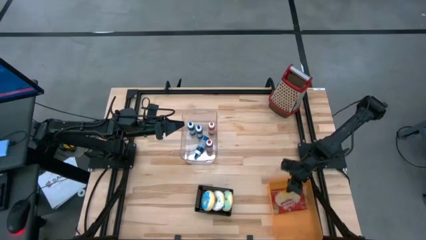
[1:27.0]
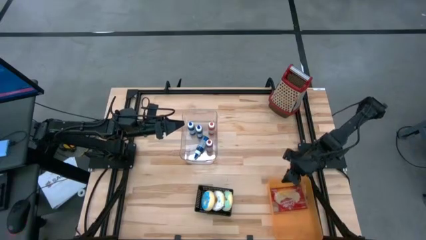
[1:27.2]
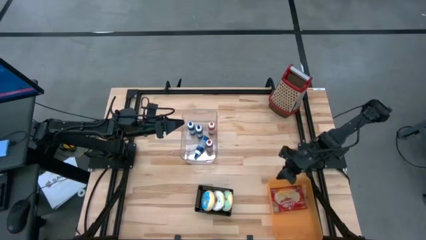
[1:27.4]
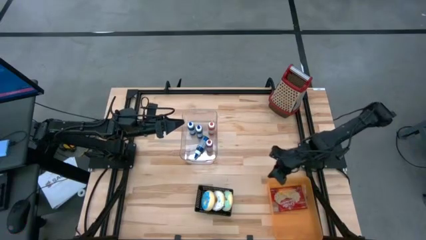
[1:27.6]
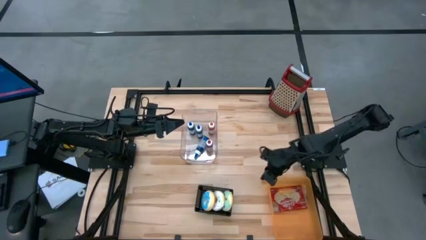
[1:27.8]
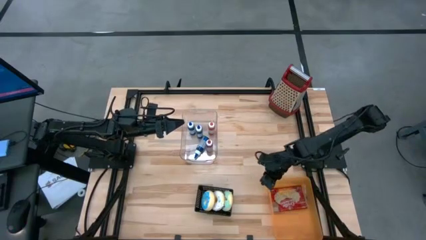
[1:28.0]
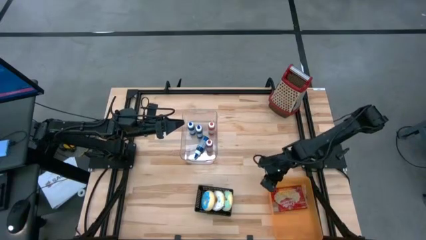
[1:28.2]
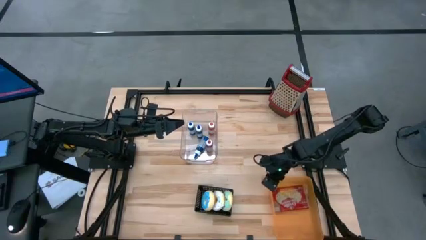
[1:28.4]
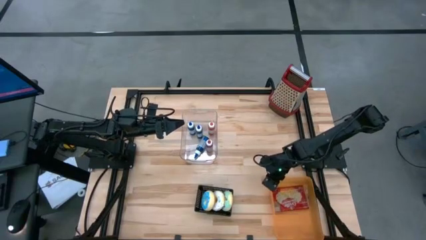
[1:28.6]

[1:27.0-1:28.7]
Adjust the orange bin on the table

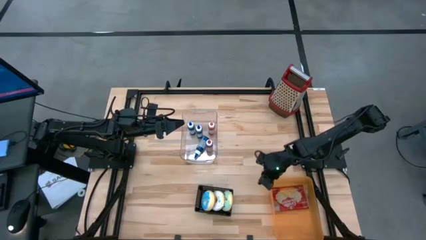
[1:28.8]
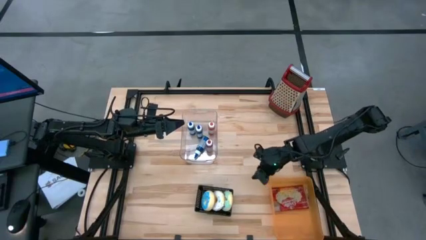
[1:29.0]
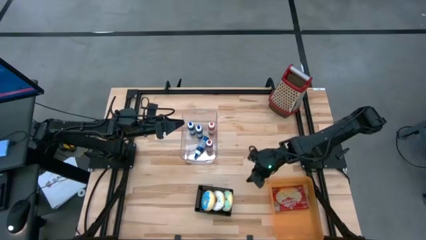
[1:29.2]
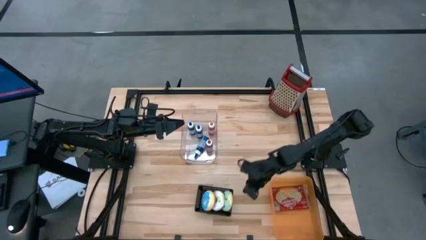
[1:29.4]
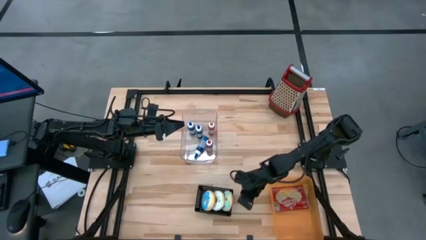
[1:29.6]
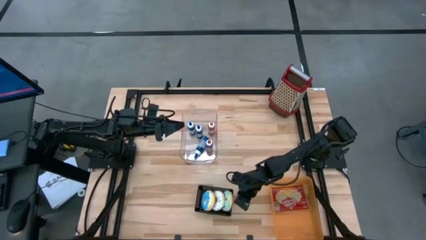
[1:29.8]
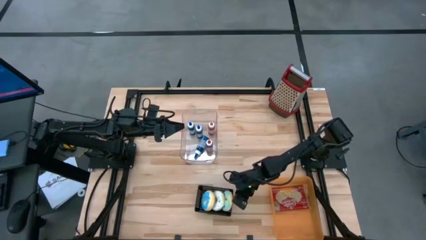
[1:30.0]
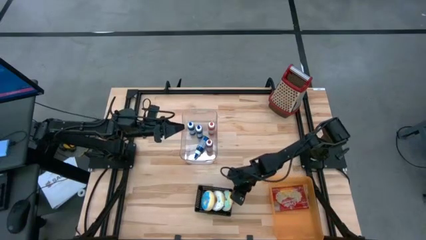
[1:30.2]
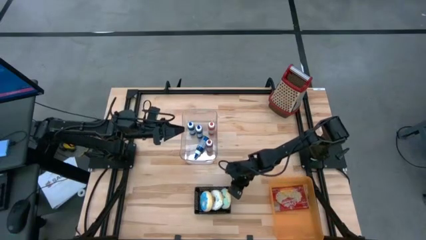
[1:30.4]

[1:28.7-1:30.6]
Adjust the black bin on the table

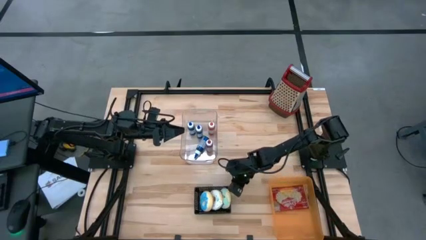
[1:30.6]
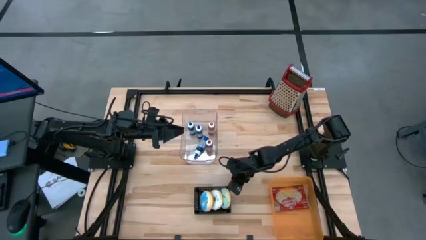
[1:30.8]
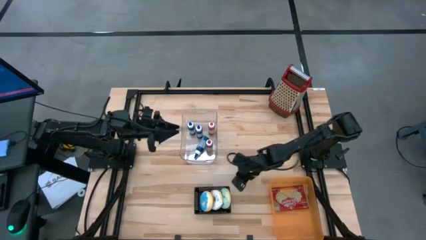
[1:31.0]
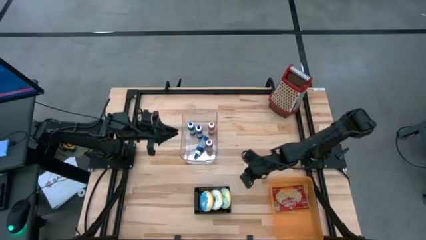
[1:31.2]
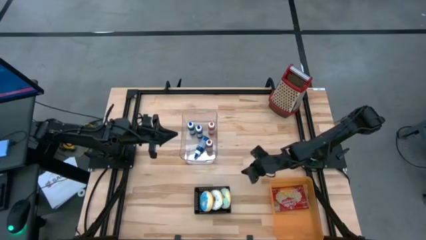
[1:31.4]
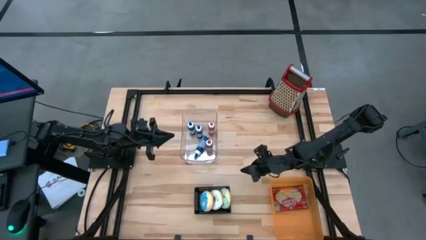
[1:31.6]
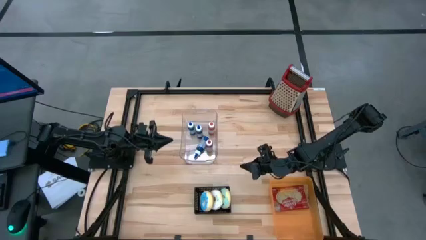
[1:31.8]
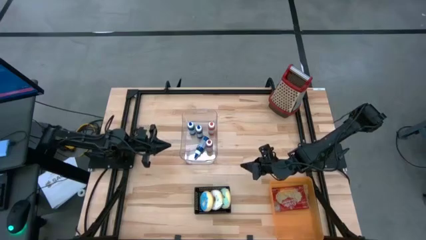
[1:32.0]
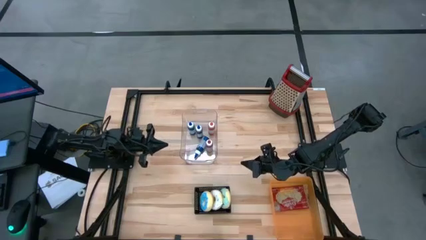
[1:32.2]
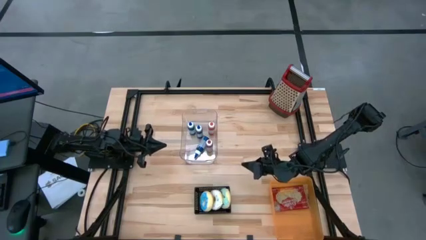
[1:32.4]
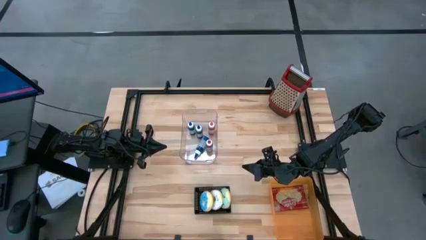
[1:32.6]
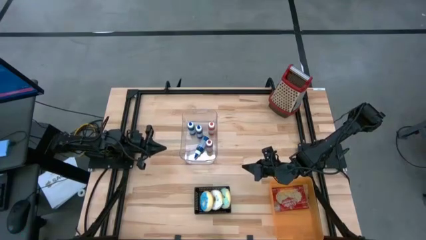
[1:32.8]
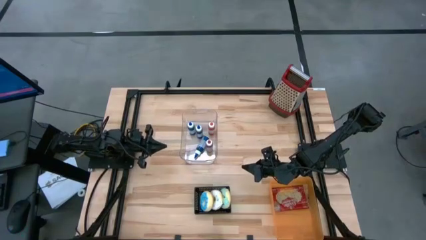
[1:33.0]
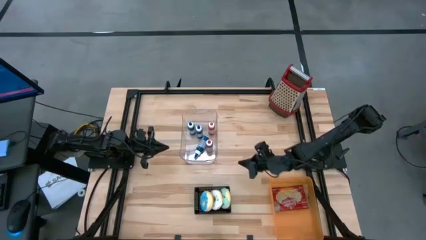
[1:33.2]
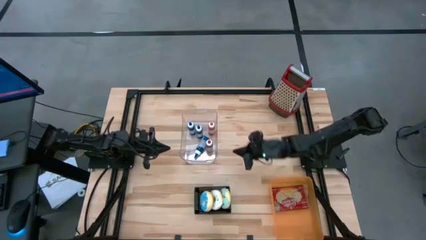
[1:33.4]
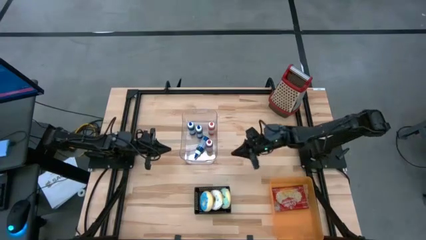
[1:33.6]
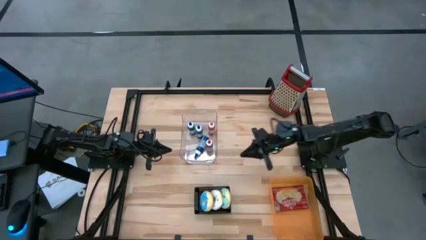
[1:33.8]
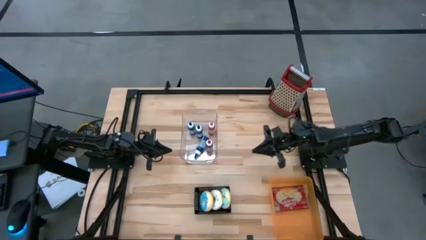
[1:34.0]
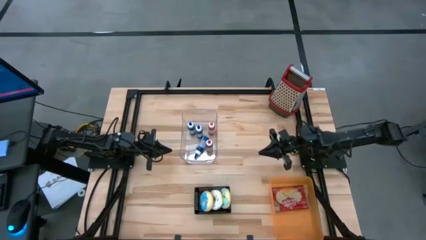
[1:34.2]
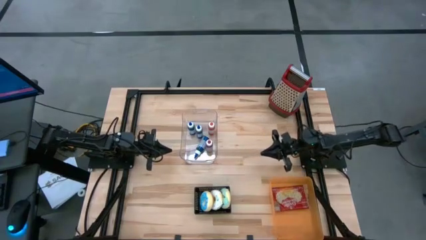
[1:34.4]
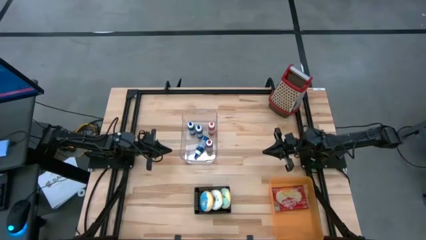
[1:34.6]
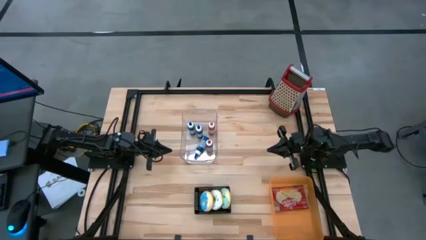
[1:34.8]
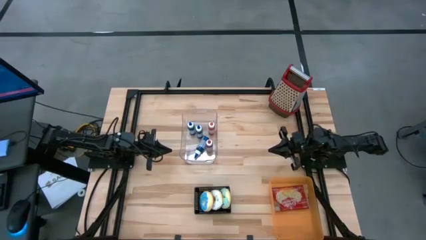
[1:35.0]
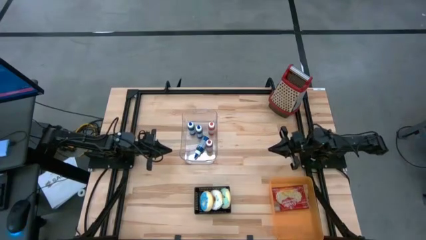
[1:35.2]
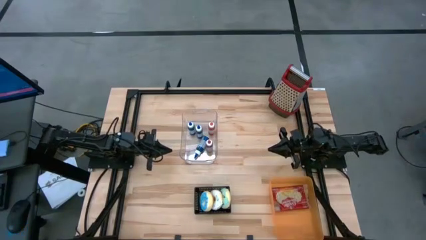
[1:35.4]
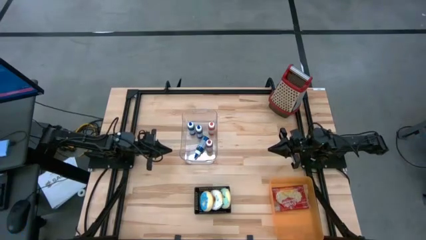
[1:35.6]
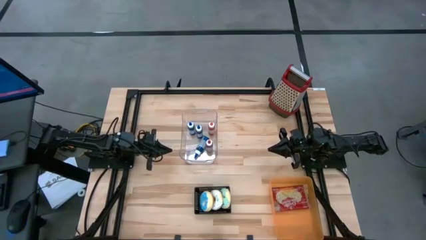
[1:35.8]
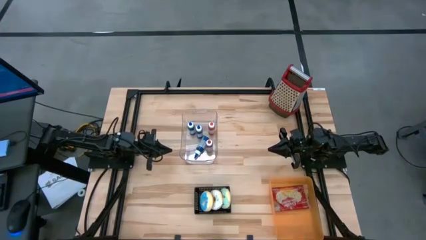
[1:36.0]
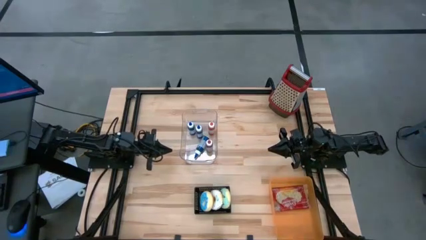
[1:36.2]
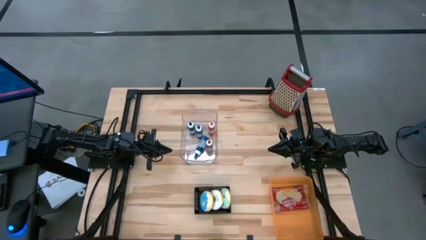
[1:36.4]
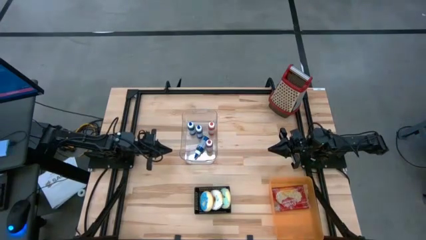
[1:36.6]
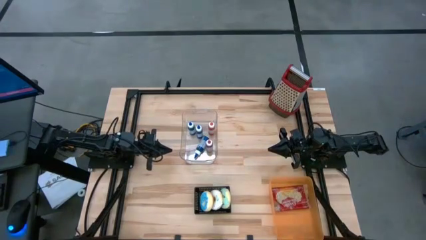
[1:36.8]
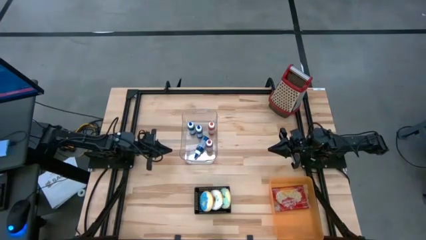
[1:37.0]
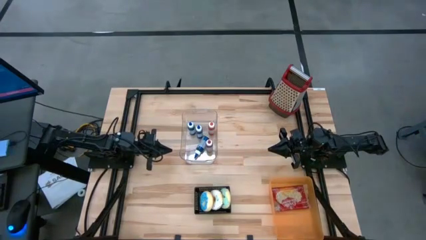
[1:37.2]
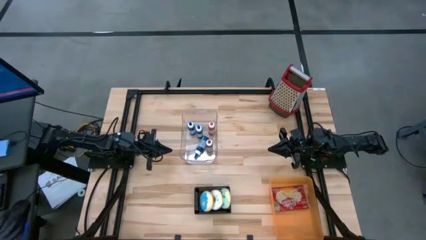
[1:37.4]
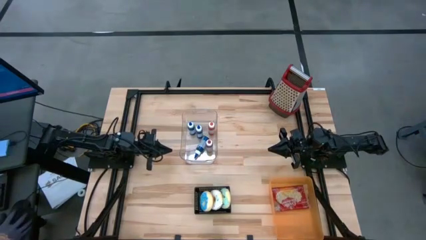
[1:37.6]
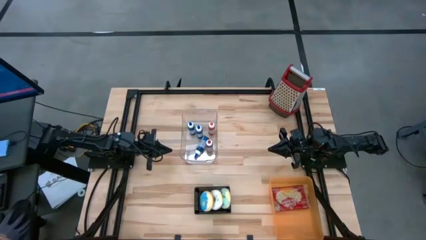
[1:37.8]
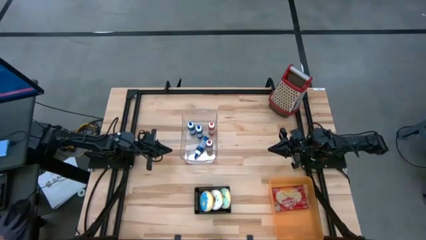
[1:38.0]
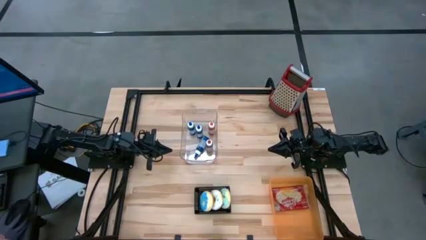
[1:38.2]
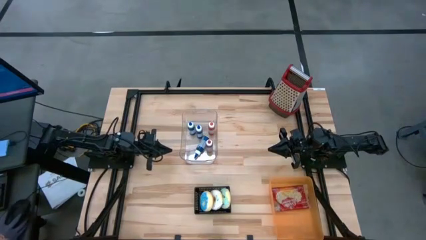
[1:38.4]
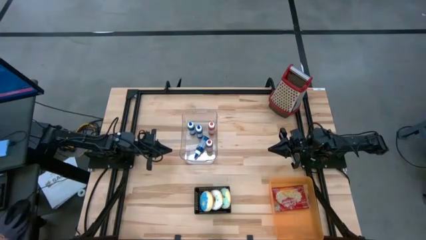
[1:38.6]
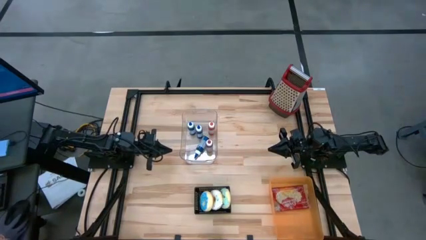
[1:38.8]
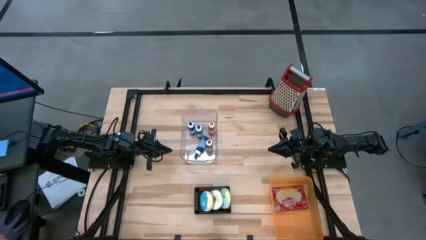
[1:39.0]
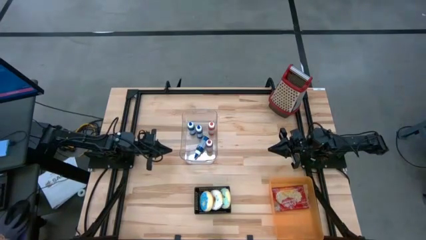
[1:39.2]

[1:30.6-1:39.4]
Return to Home position
